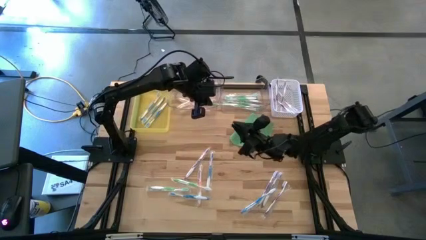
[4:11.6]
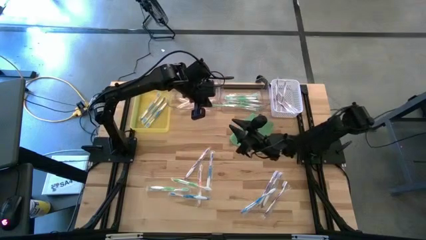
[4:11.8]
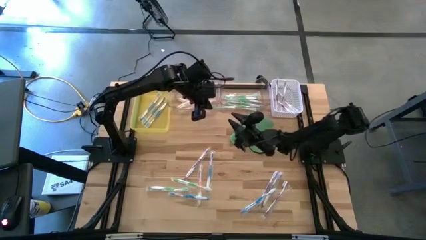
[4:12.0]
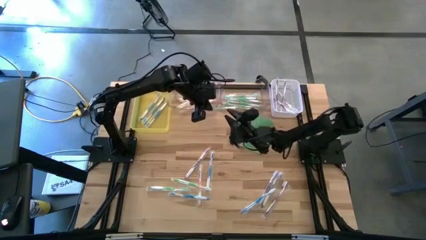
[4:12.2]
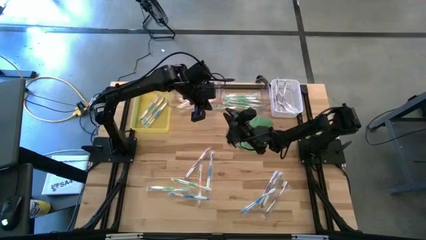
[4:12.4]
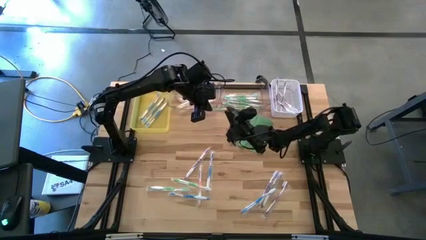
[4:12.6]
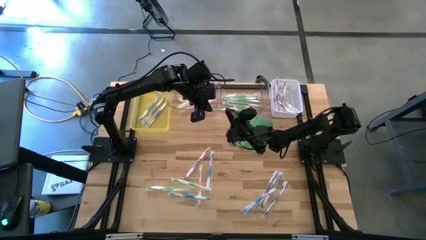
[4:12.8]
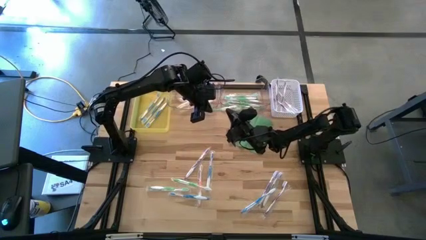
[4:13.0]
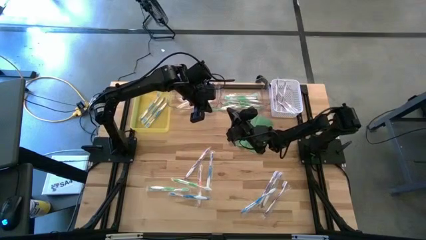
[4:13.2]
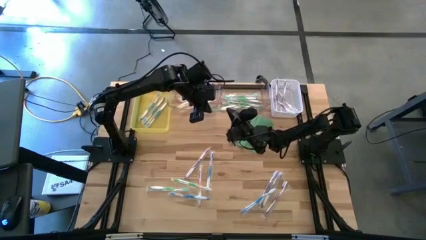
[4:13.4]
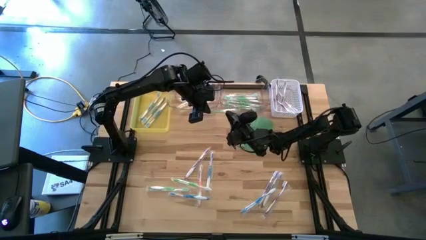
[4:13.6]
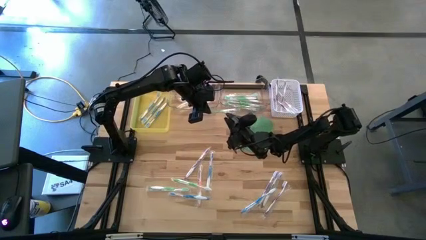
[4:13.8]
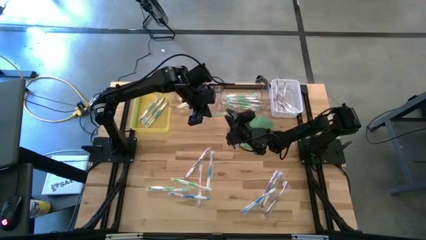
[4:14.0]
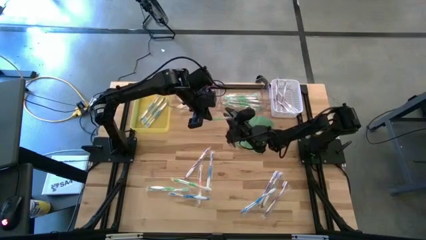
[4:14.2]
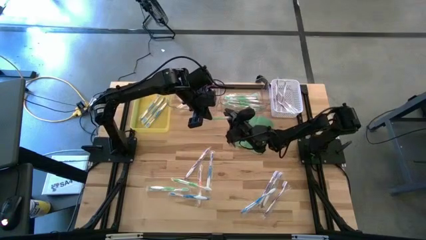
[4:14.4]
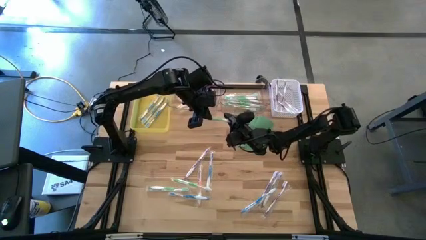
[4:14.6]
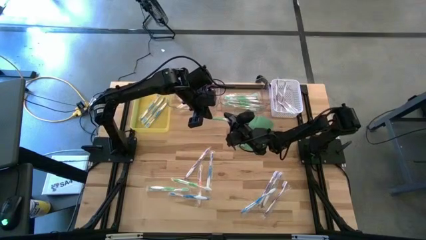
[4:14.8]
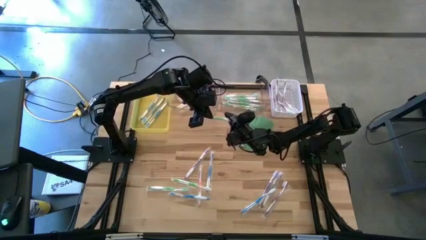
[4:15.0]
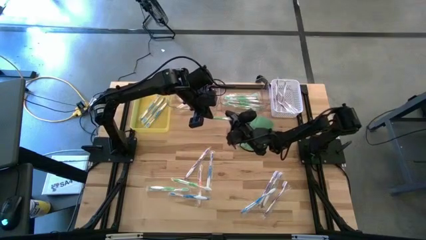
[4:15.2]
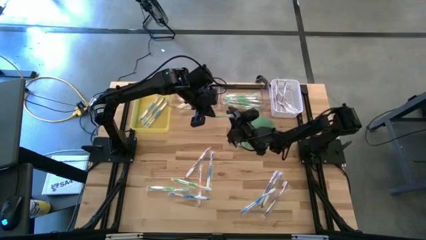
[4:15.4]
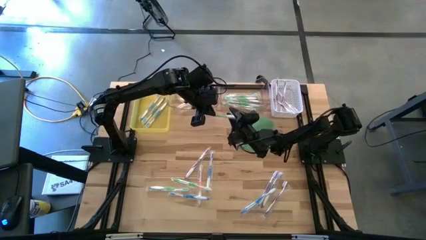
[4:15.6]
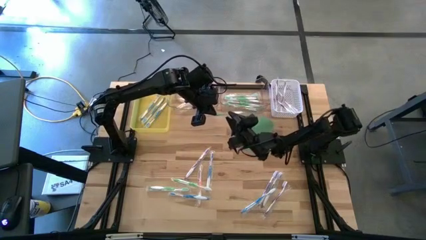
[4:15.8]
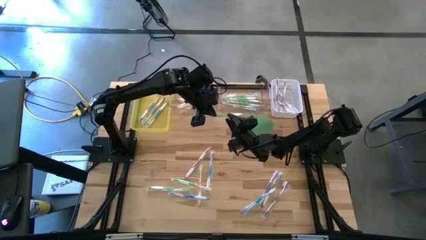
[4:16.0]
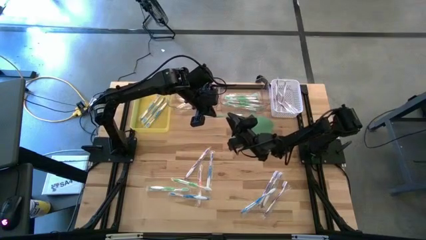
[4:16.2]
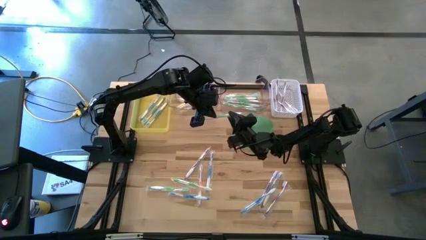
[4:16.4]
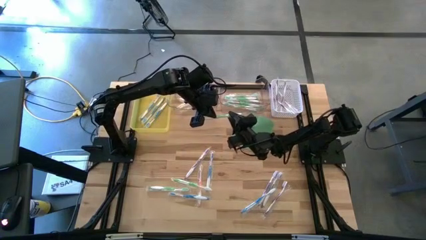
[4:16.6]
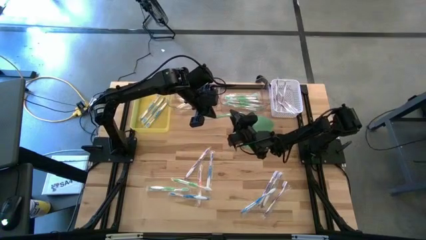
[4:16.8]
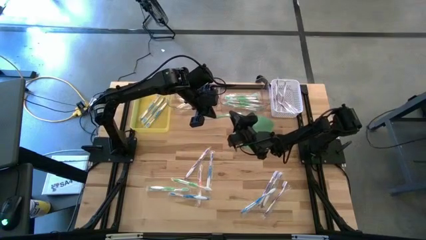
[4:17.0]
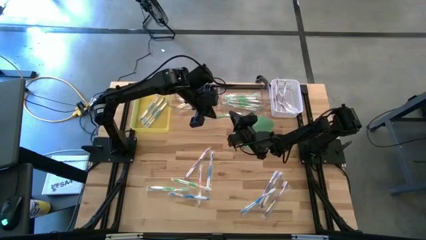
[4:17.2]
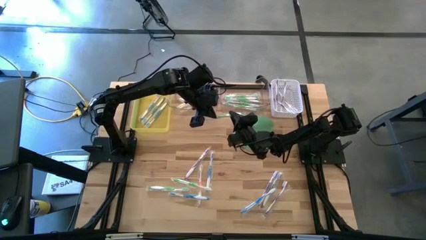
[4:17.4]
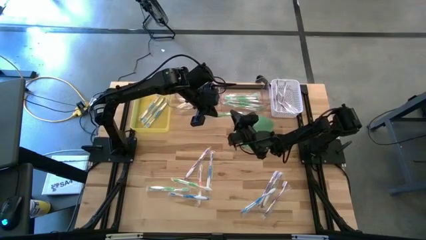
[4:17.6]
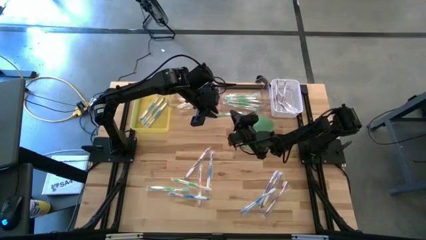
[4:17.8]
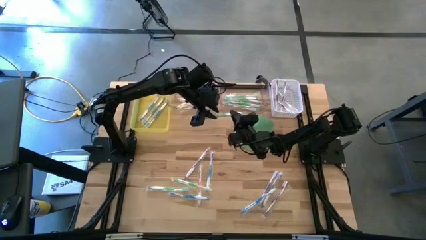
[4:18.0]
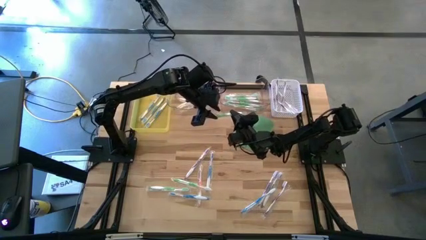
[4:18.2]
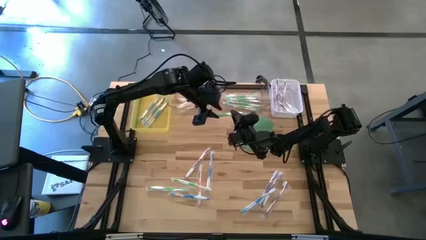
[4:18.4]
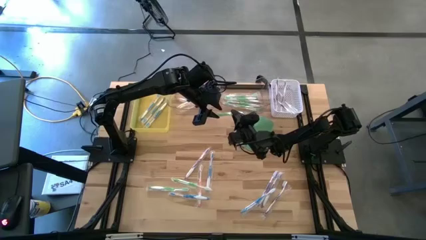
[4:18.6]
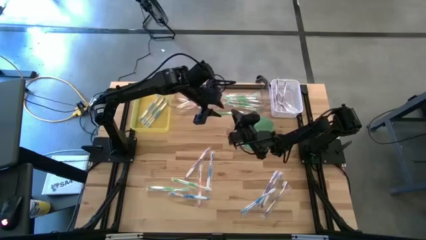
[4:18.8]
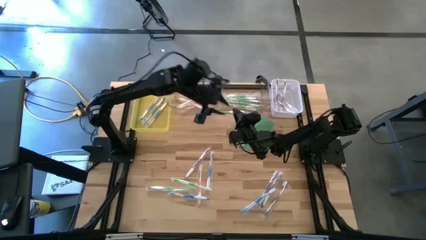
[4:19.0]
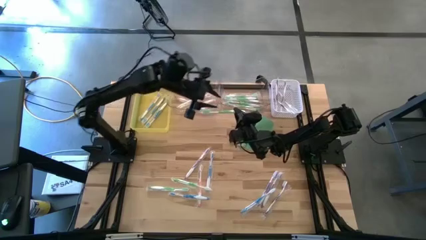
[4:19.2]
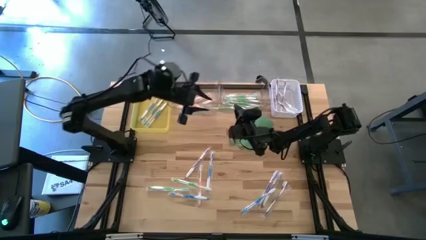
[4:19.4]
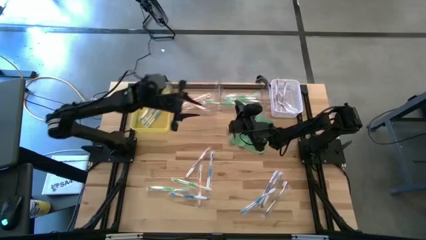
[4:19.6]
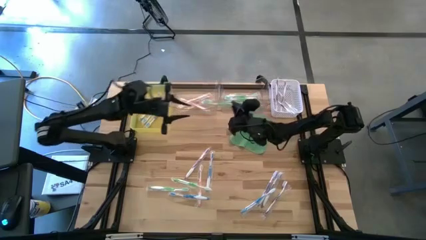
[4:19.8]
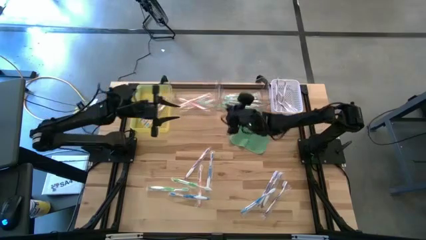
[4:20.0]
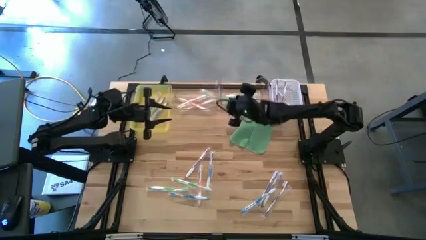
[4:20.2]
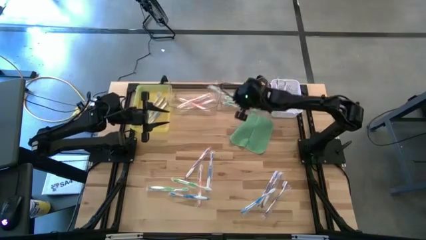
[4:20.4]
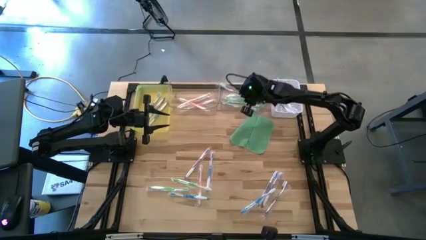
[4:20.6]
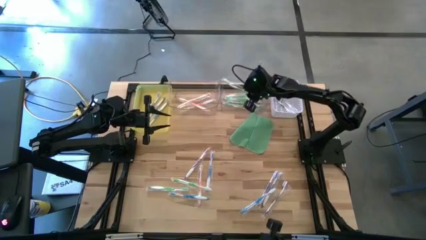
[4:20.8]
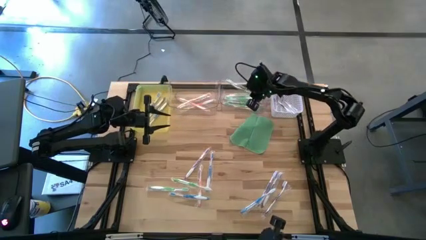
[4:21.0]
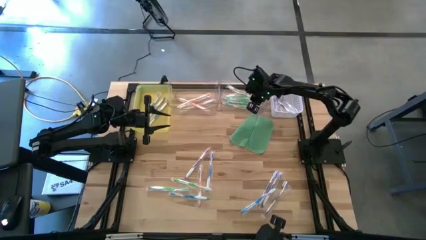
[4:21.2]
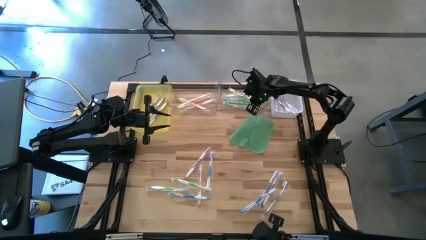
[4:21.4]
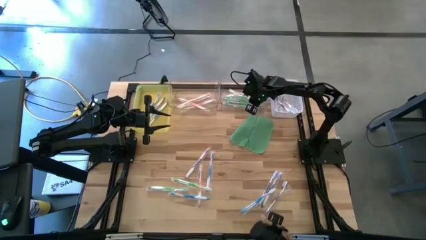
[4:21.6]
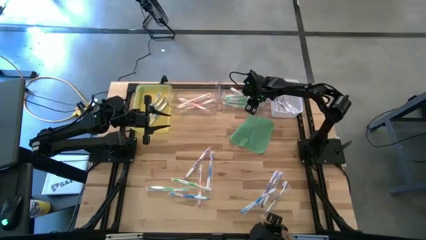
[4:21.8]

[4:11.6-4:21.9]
Task: Pick & Place Toothbrushes
Put the green toothbrush into the right transparent bin

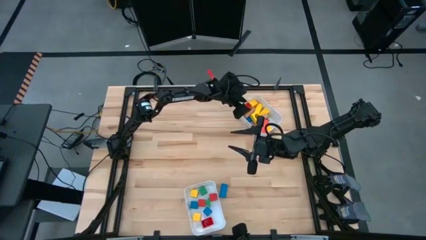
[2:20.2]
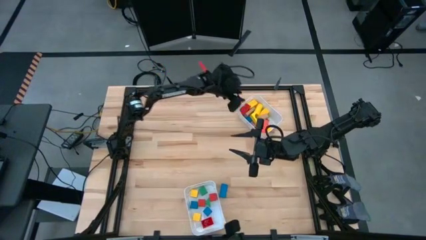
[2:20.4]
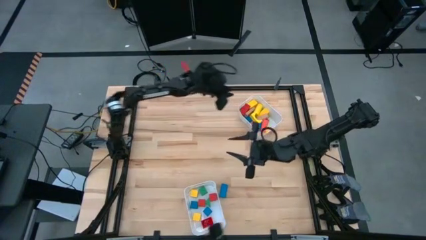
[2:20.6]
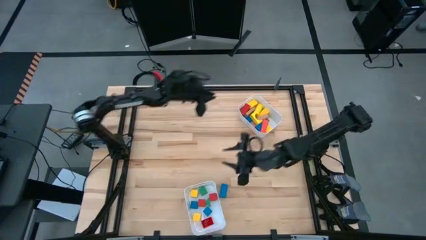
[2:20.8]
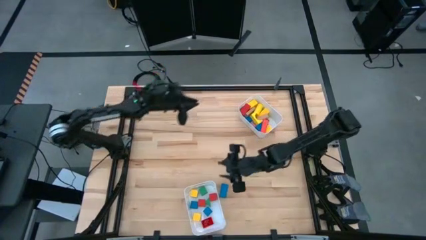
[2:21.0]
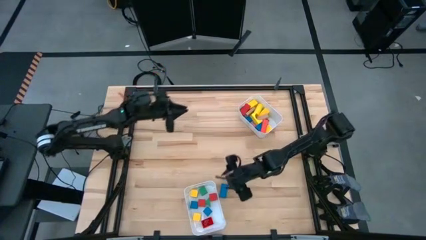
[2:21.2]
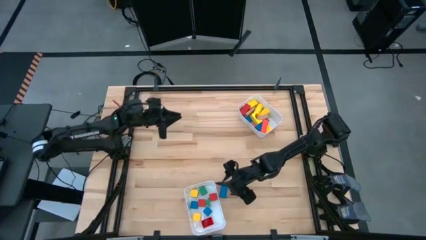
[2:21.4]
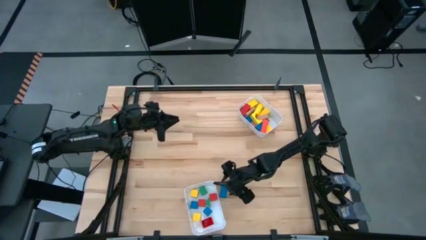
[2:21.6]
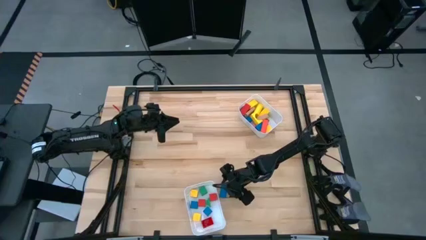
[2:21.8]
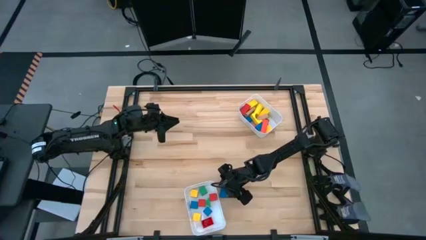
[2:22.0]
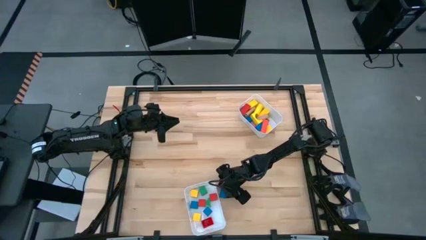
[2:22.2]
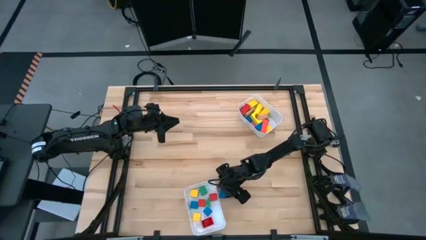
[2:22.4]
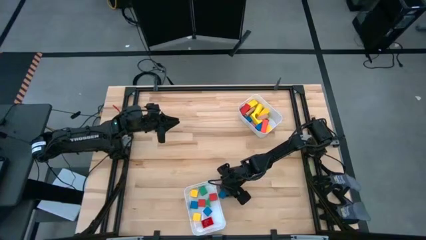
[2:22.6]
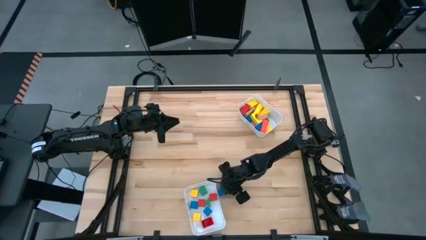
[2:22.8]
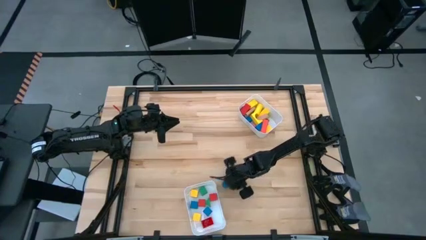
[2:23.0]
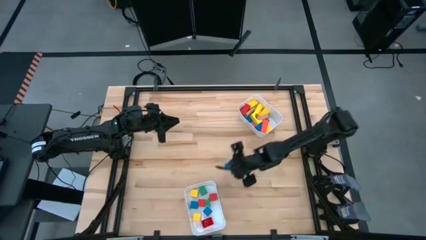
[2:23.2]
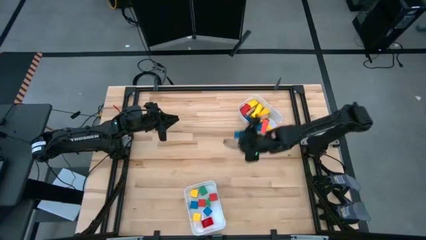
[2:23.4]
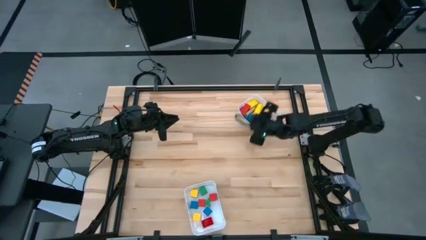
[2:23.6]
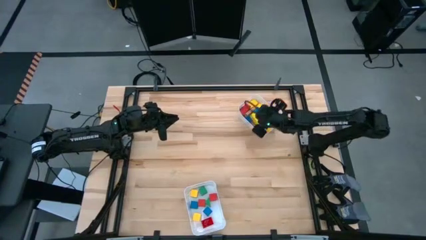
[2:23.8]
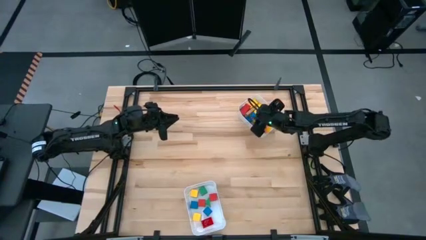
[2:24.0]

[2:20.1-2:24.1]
Task: Sort blocks by size
Put the blue rectangle block into the top white bin
